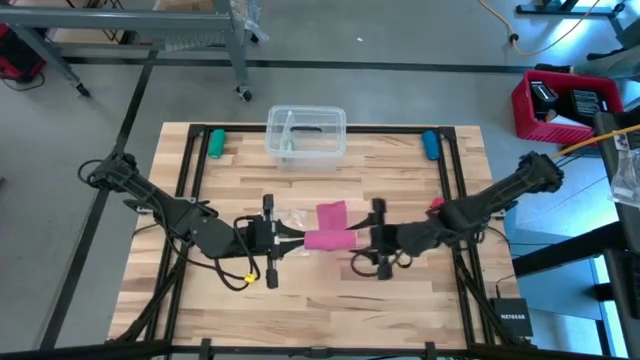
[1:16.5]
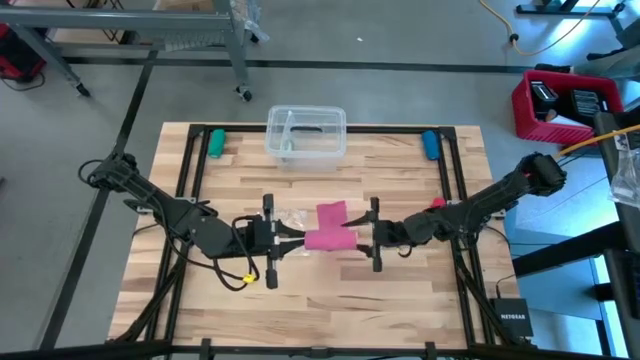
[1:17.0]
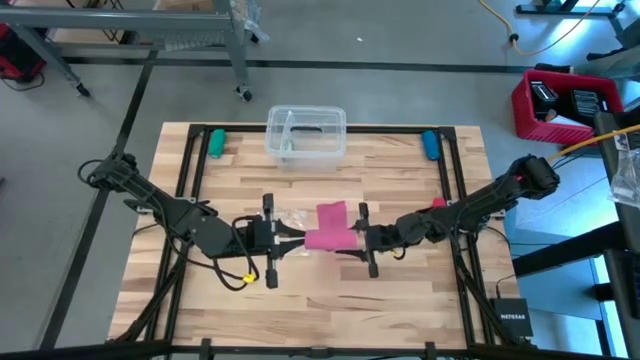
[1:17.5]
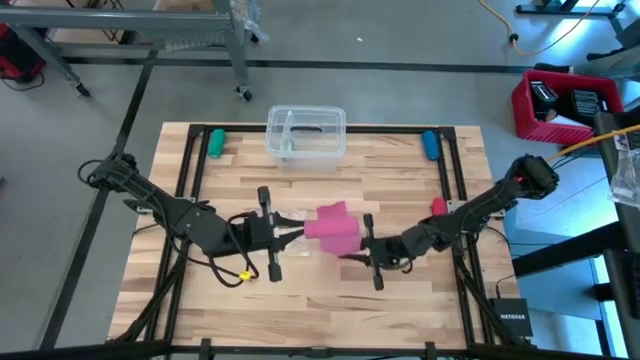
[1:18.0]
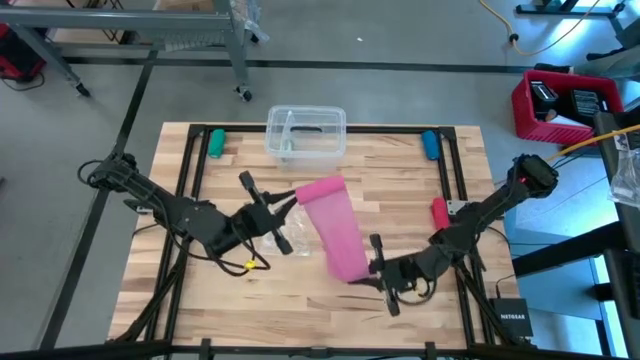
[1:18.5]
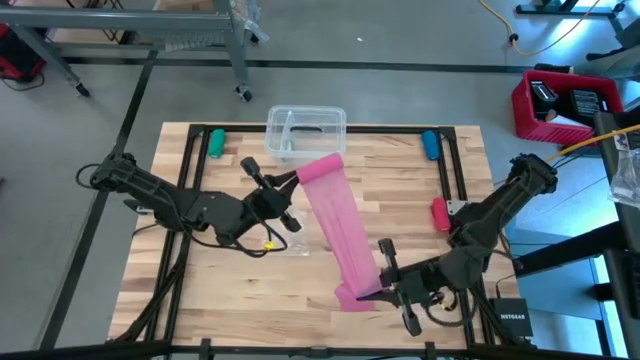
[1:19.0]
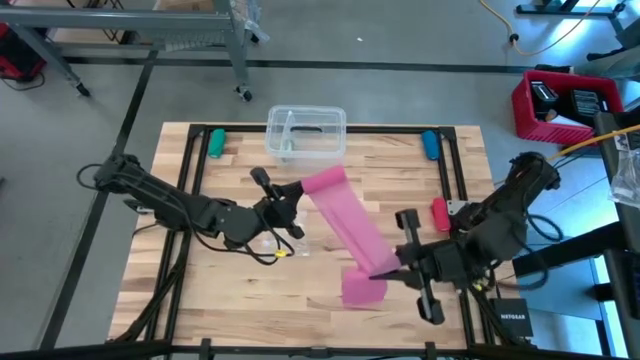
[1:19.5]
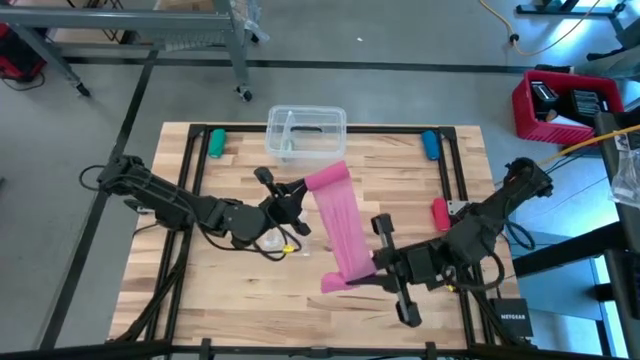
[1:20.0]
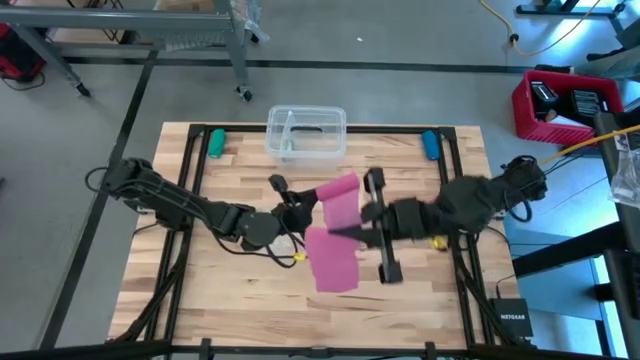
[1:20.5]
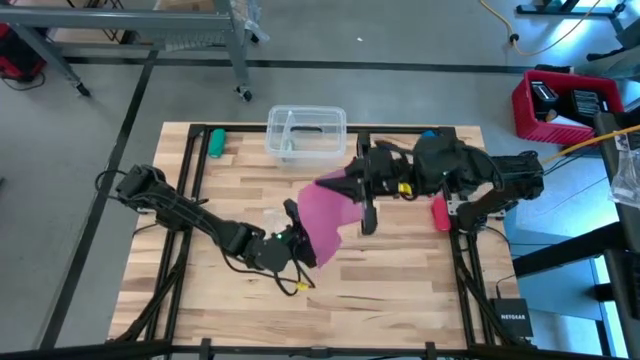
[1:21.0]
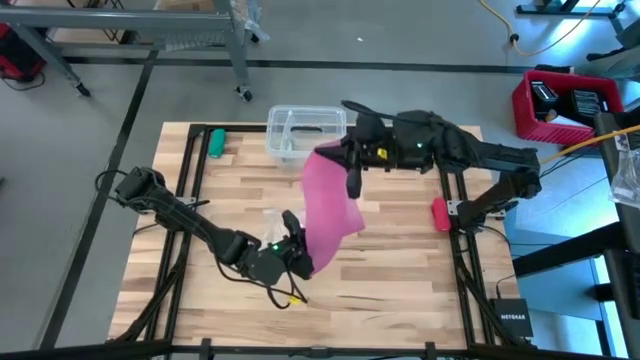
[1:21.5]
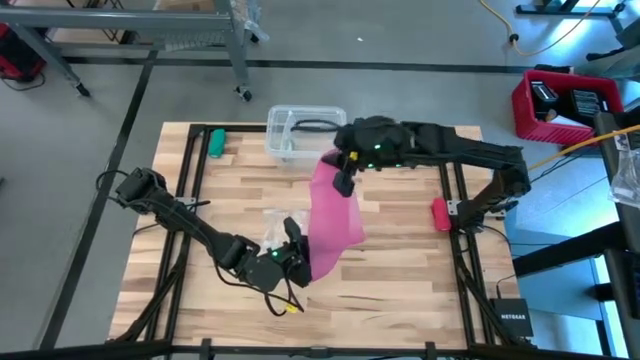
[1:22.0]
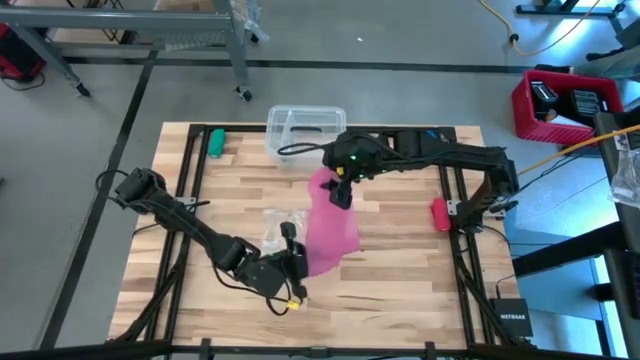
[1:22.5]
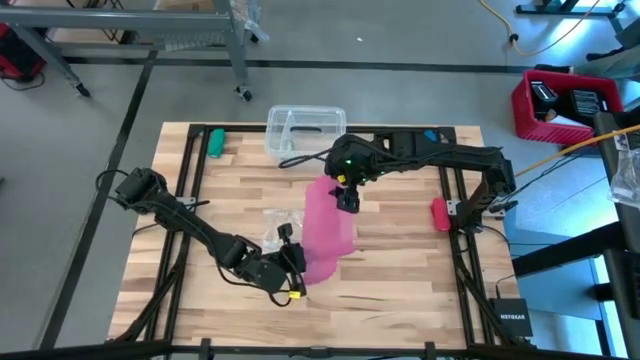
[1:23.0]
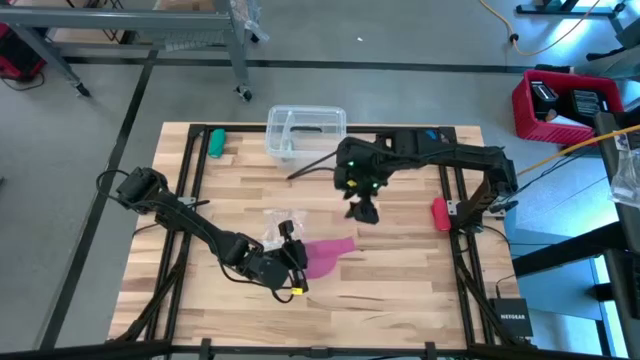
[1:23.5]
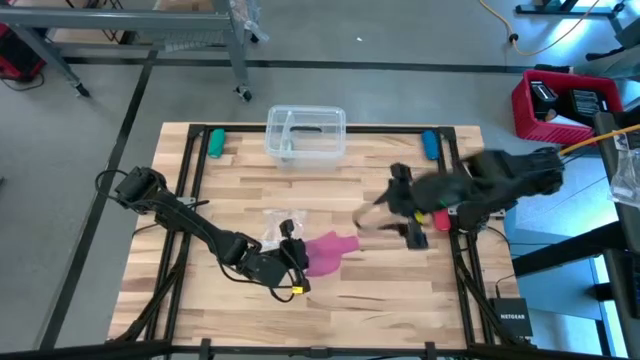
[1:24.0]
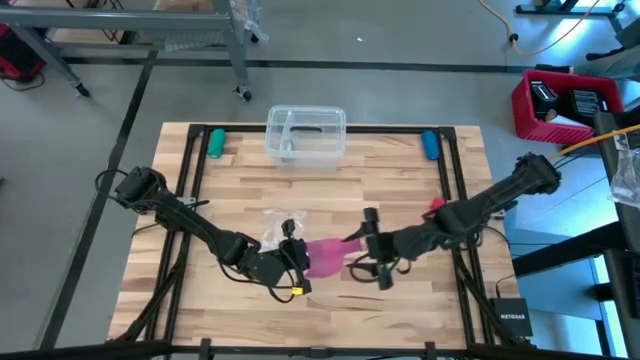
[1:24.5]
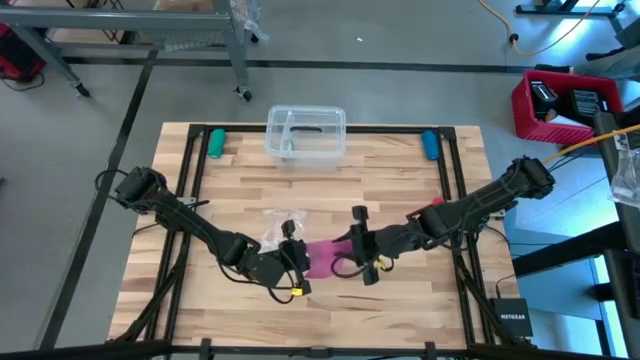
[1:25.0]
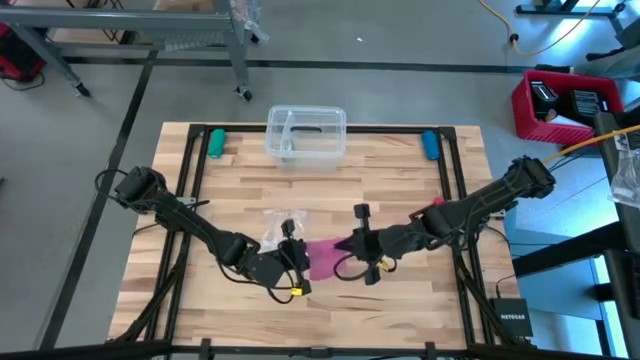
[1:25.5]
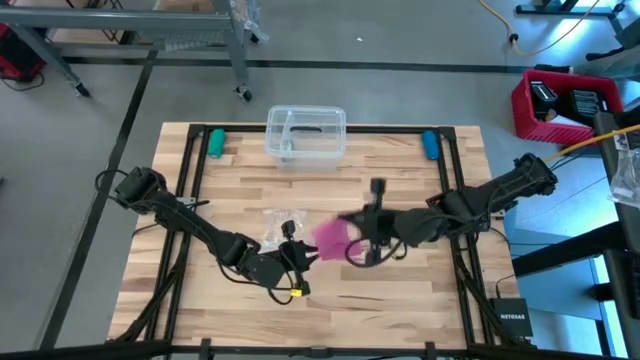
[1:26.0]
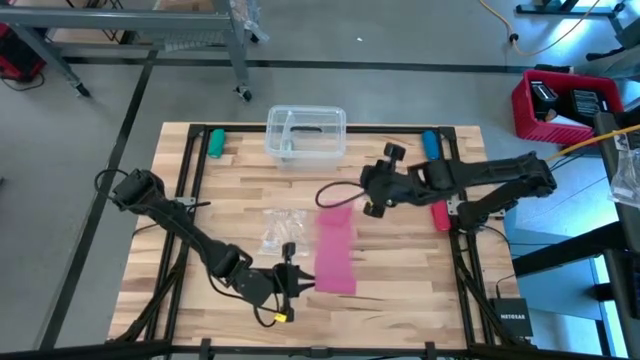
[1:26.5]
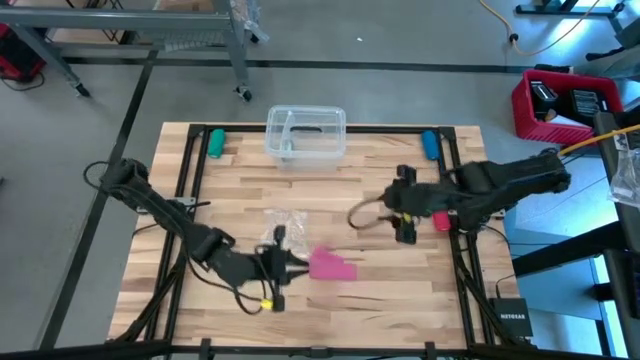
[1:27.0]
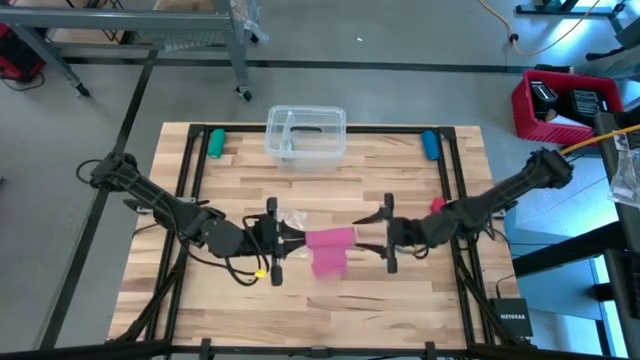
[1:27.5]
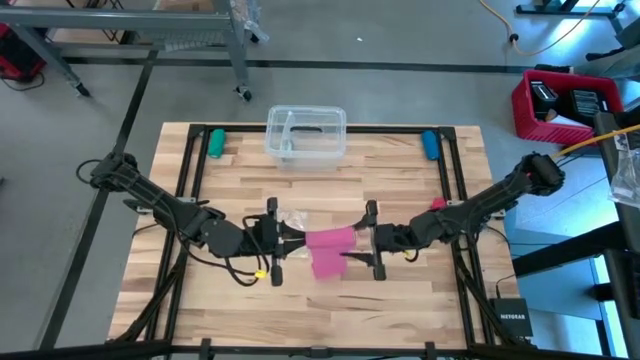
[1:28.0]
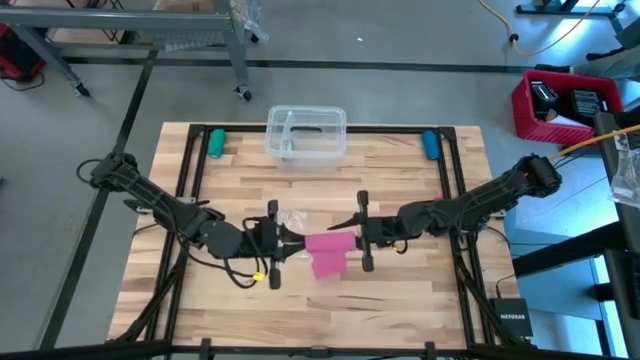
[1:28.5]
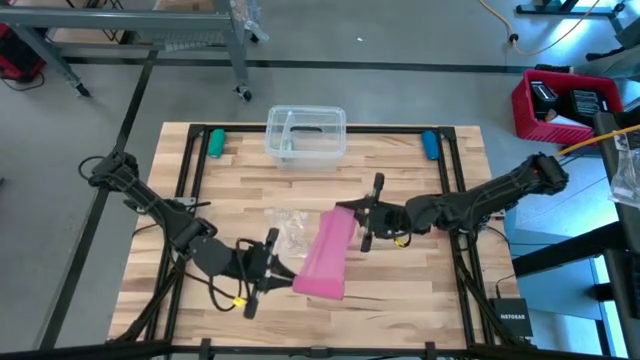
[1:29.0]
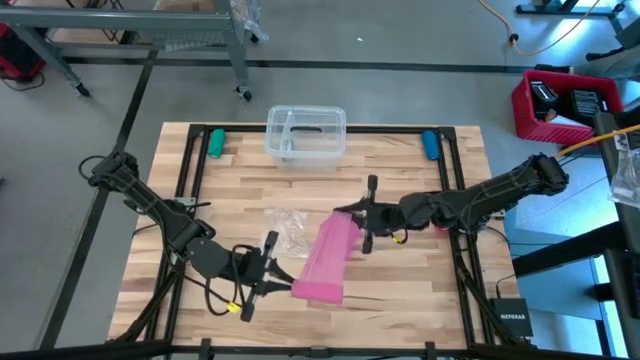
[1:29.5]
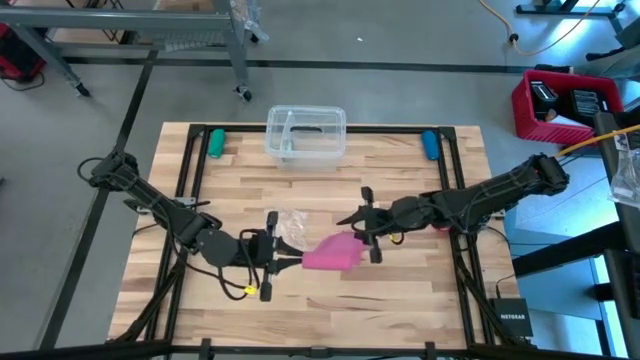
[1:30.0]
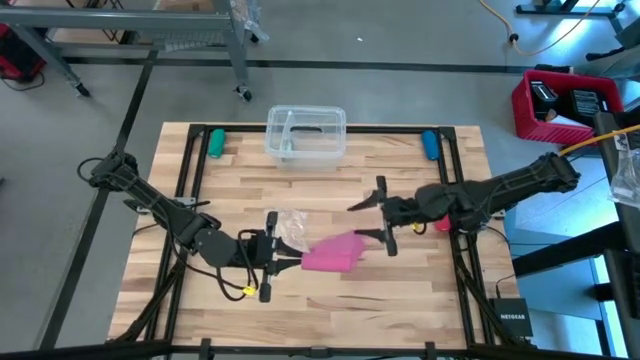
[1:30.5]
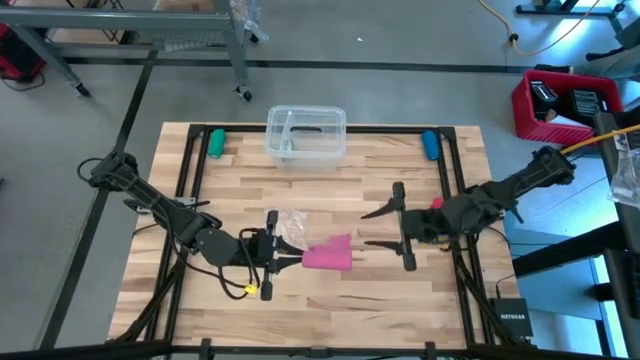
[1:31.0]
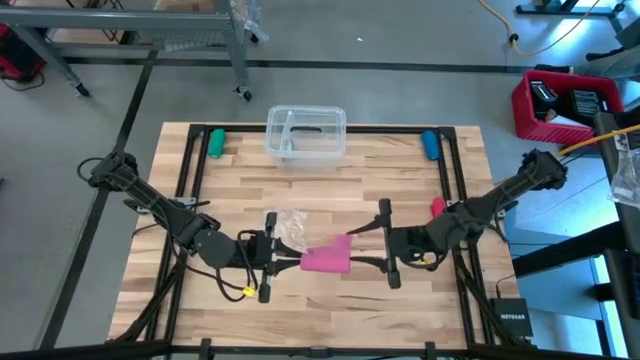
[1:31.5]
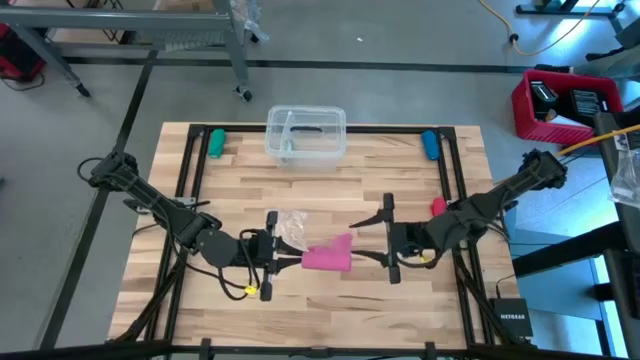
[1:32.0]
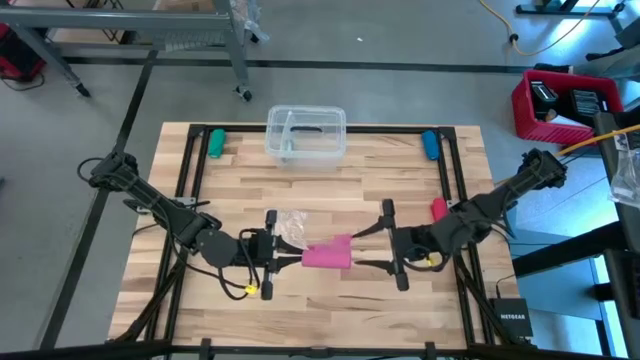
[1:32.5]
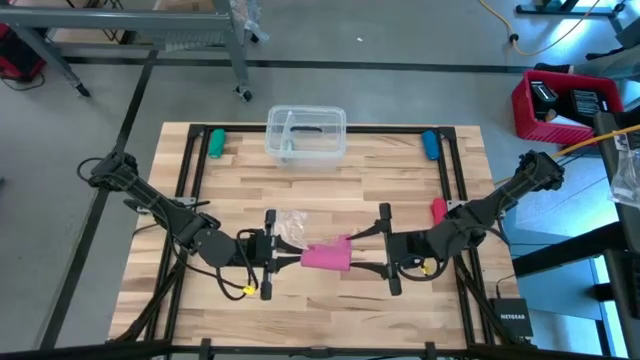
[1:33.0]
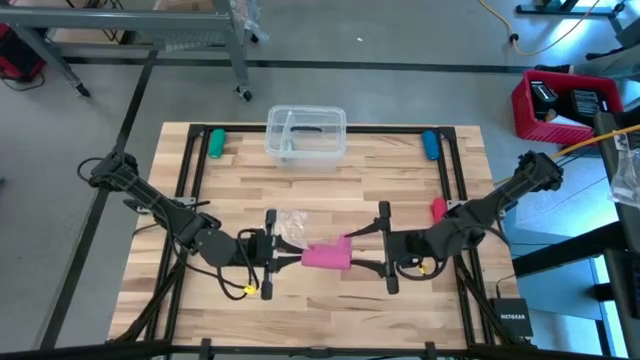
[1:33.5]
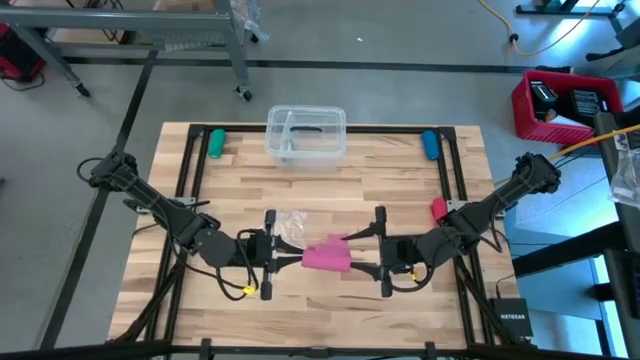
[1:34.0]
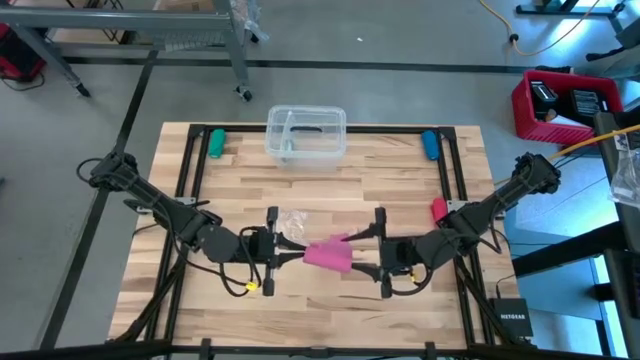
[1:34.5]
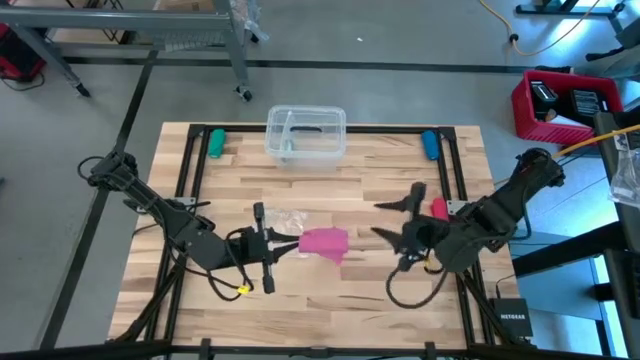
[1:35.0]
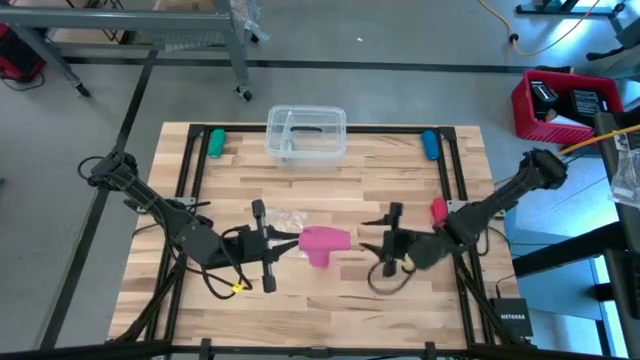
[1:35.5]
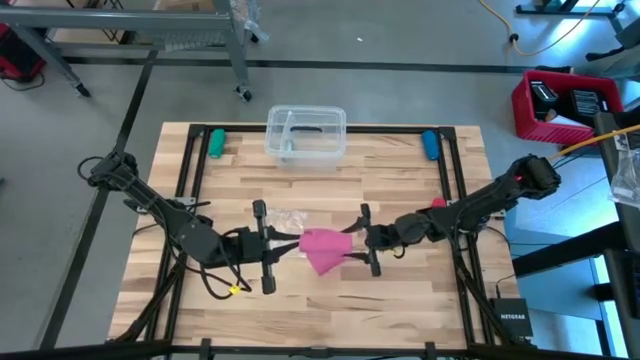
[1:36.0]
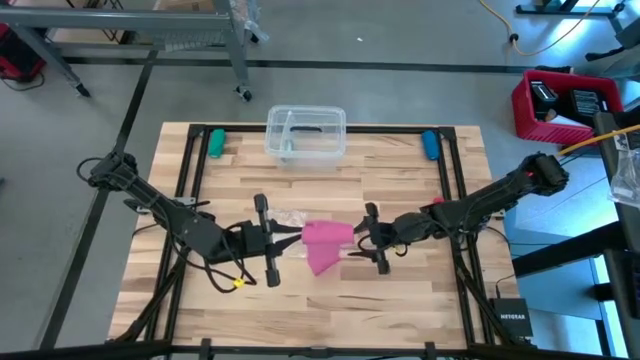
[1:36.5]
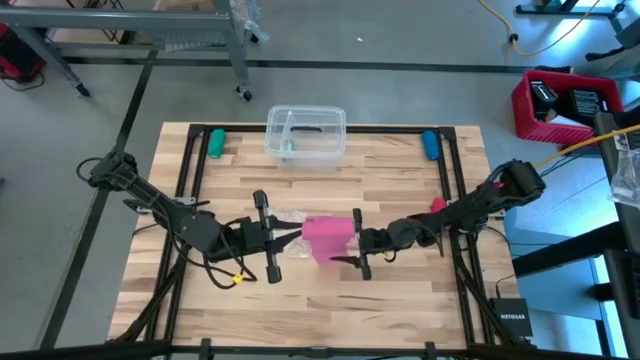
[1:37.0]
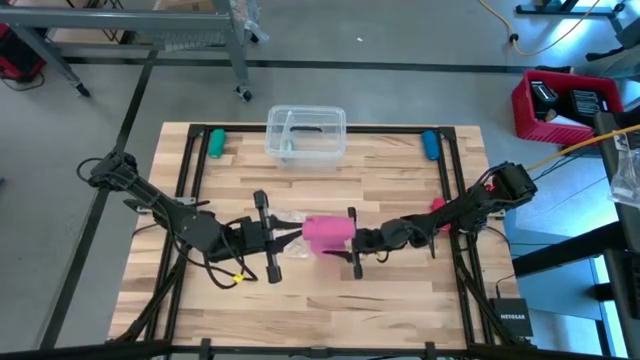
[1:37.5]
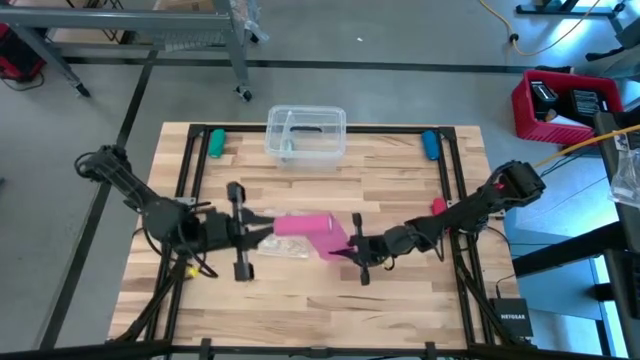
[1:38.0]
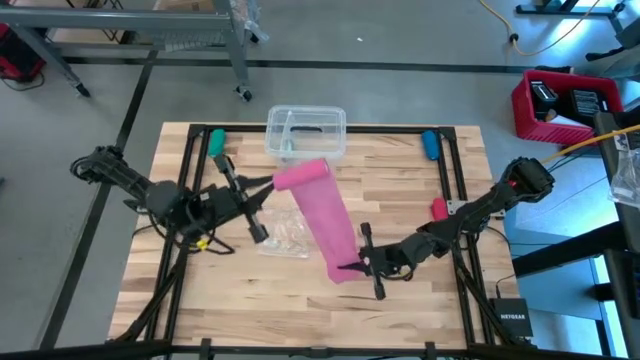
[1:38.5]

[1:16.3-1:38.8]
Task: Roll bandage
Roll the pink bandage
